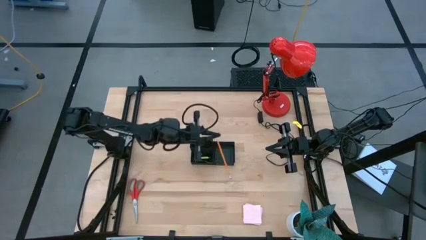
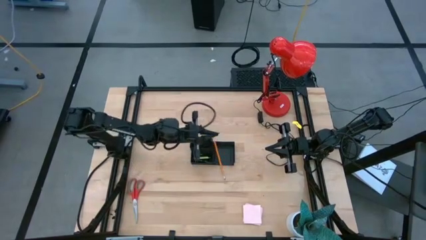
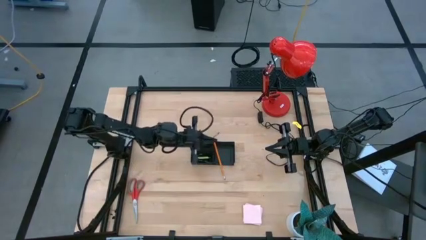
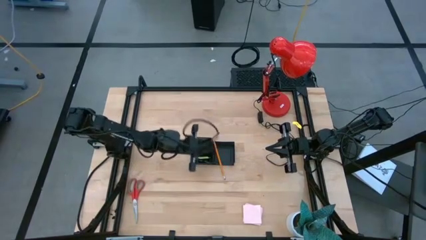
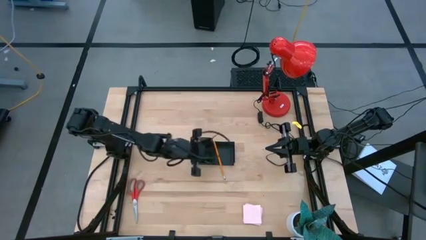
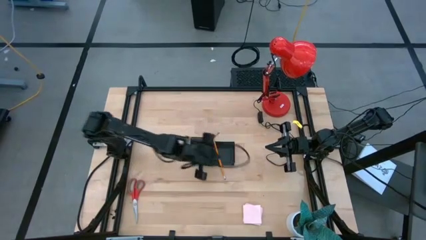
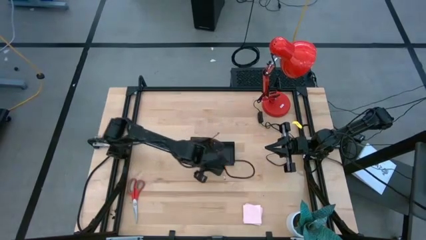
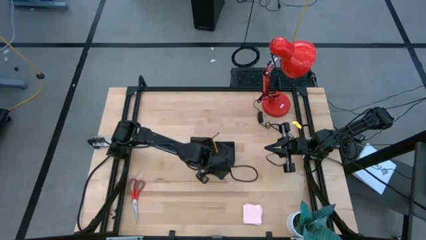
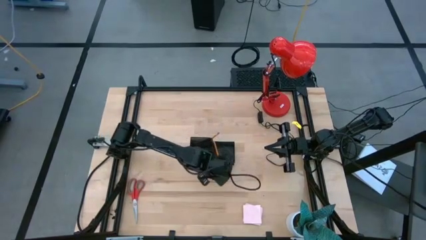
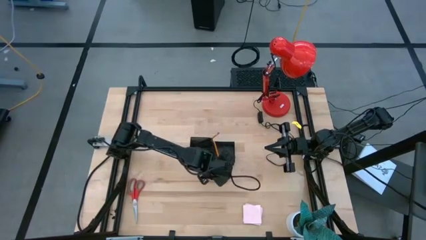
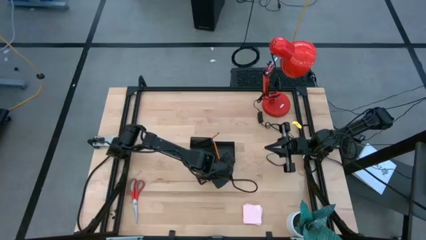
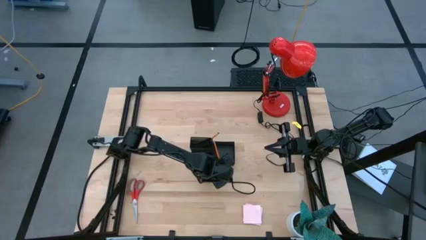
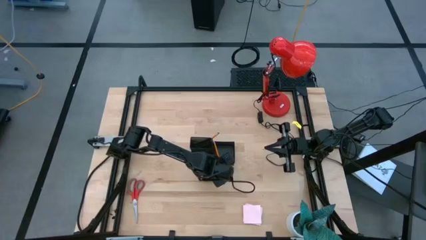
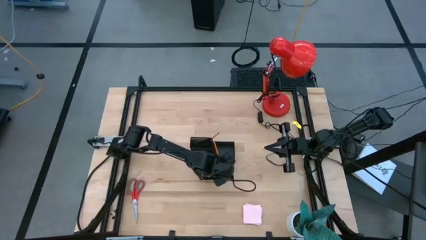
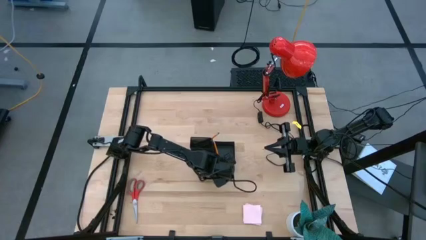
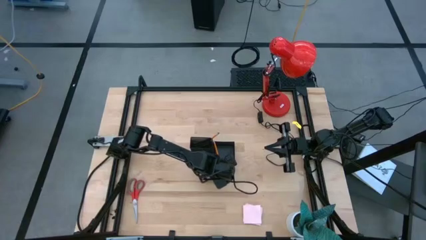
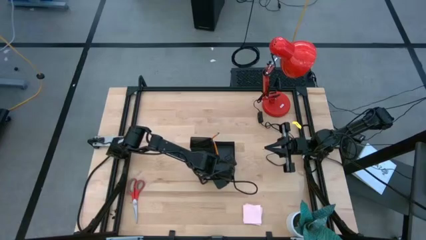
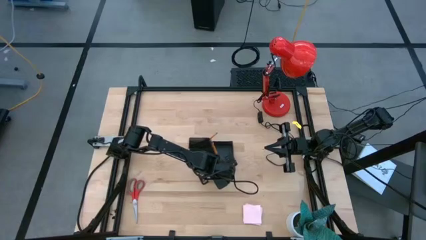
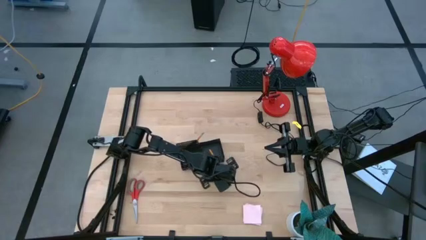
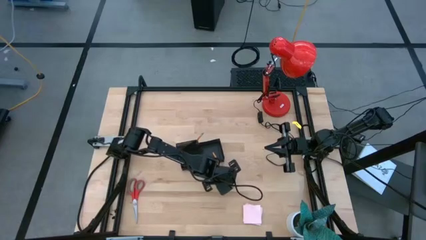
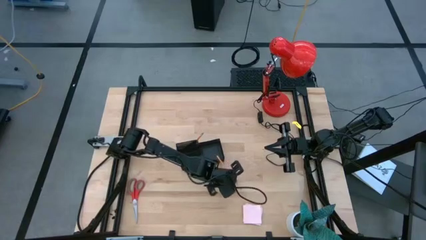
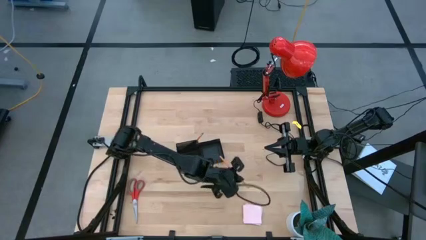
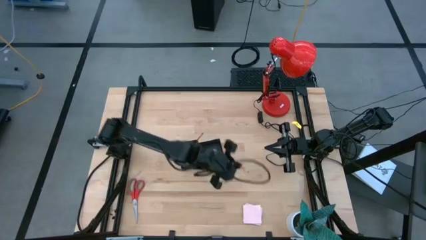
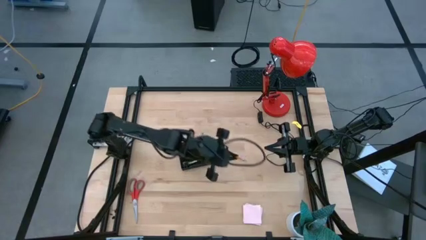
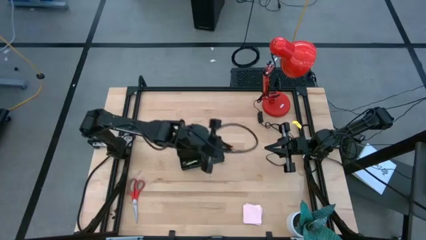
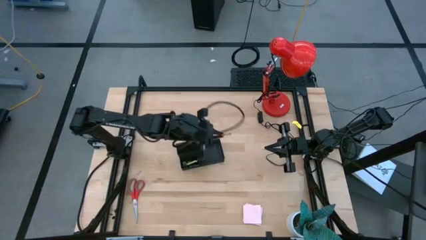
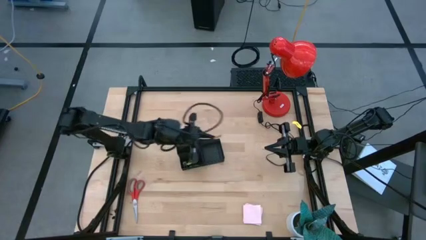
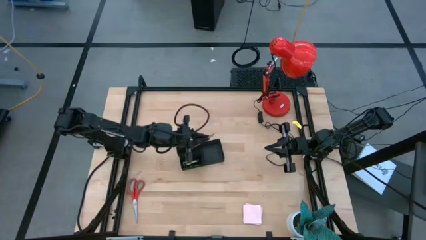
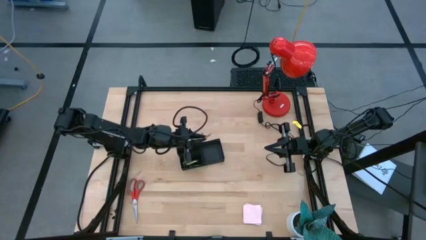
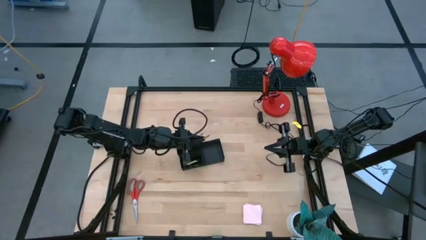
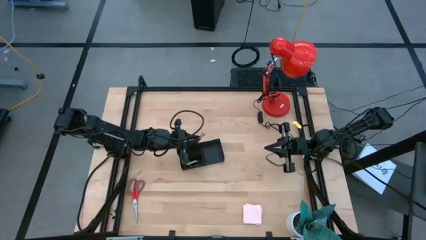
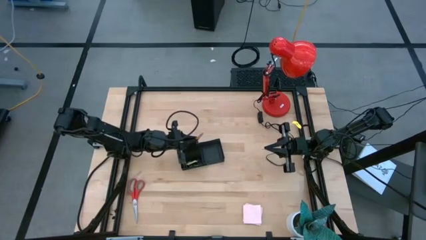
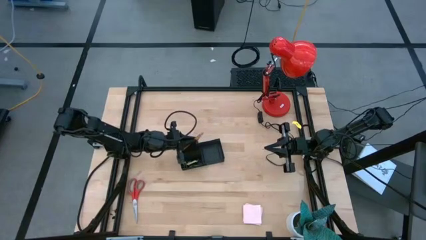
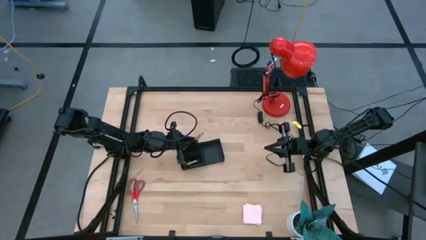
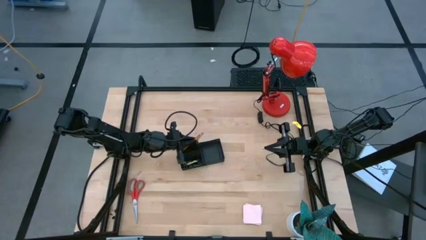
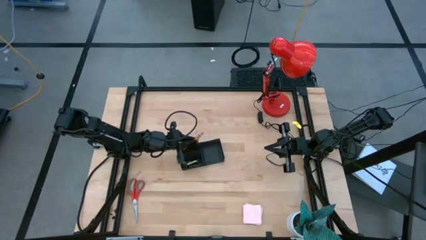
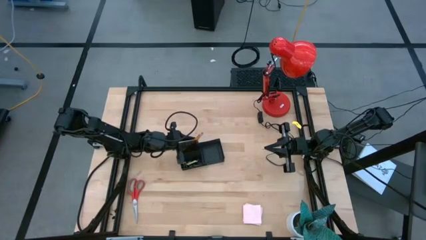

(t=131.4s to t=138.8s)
Task: Pick and place office supplies into organizer
Put the pencil into the mesh desk organizer

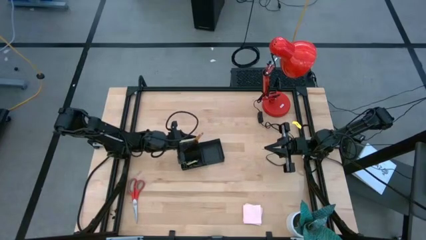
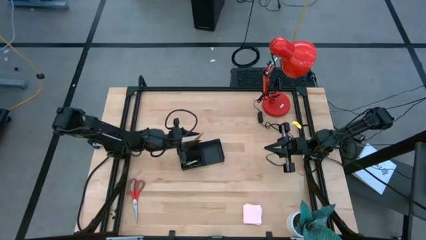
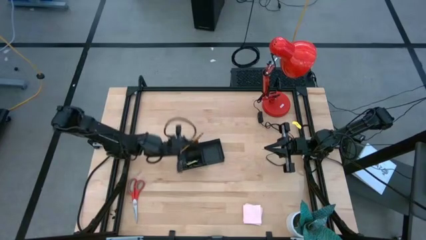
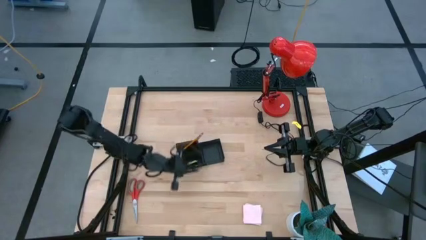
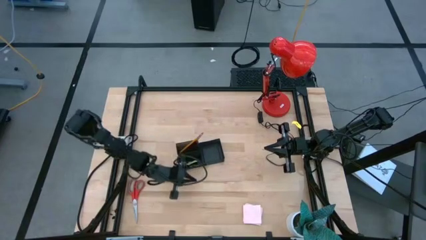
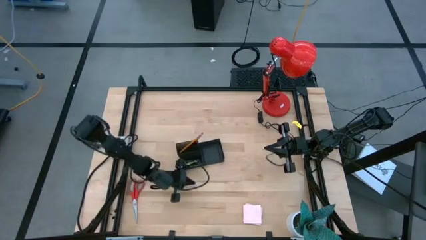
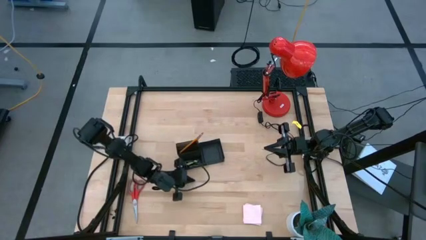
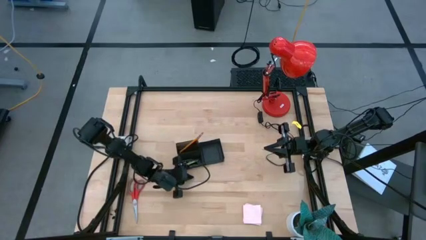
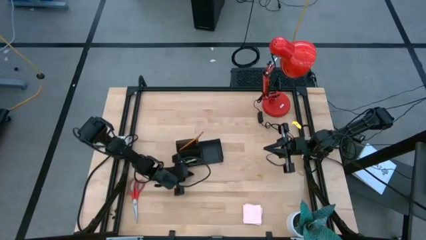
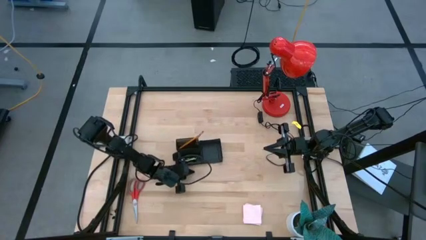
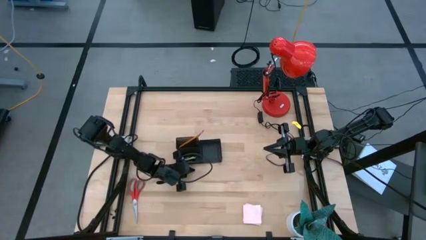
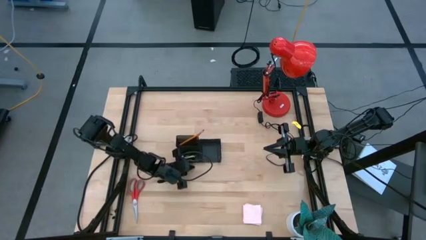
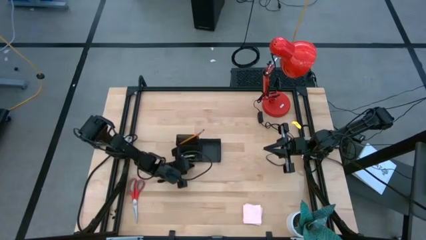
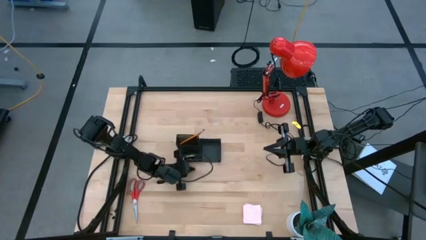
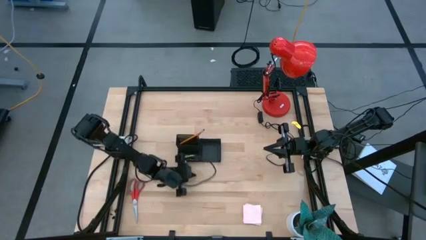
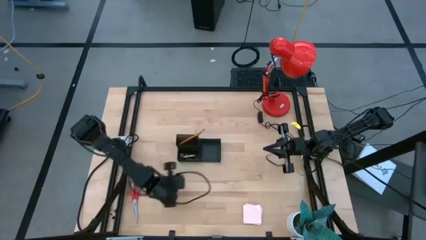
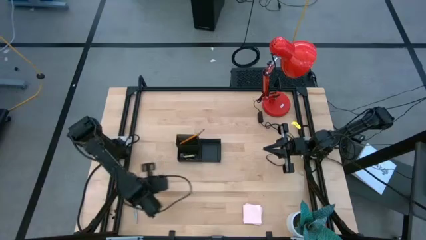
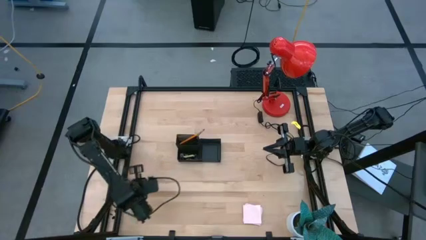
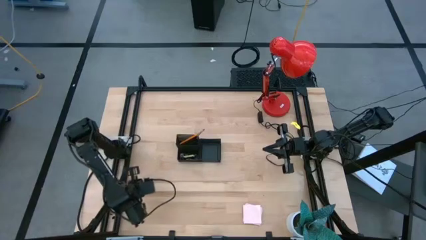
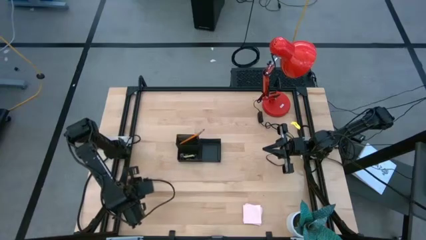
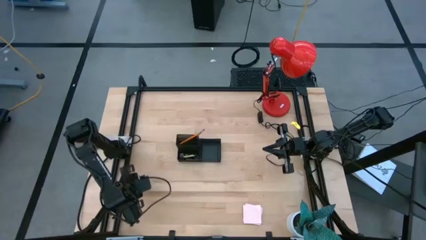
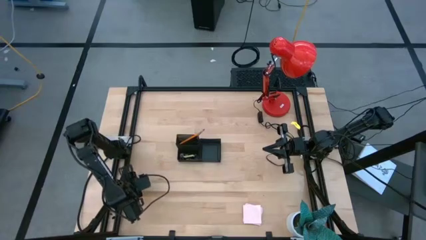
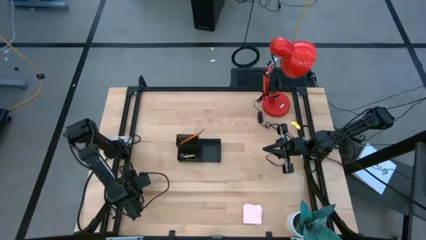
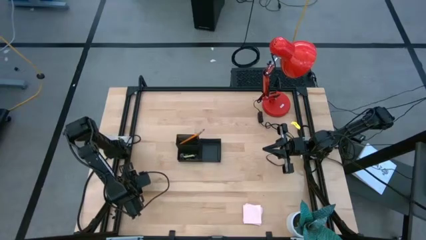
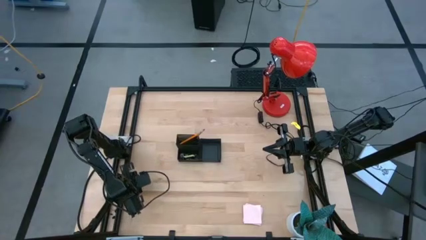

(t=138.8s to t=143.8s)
Adjust the mesh desk organizer
